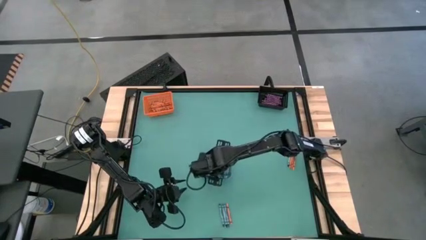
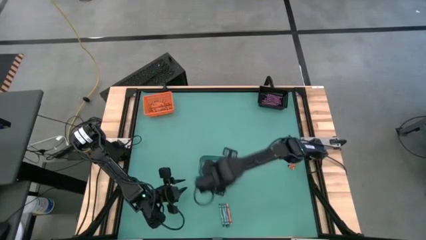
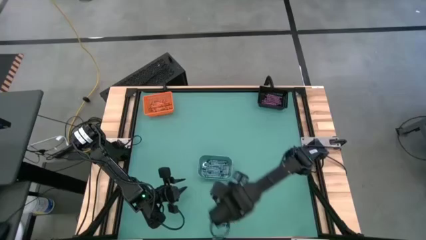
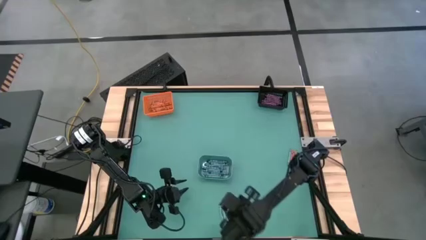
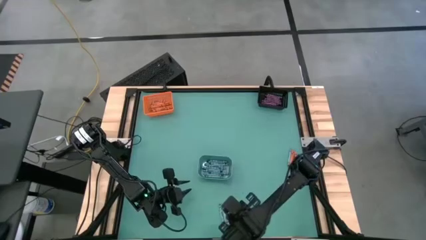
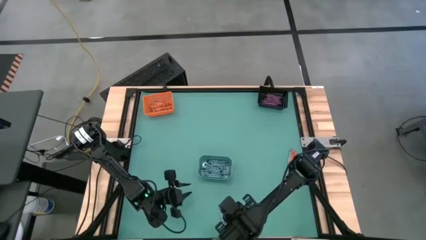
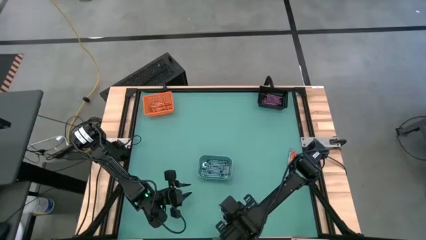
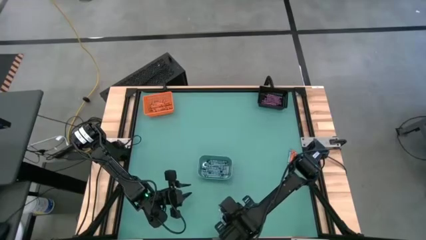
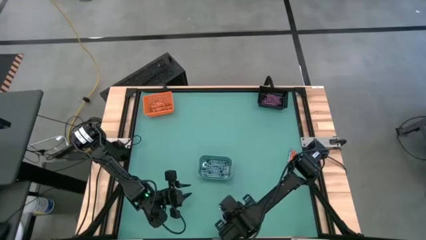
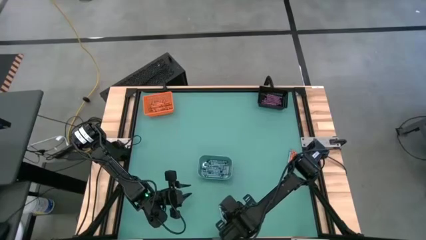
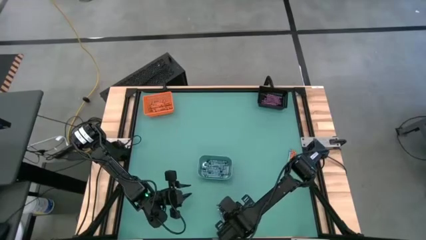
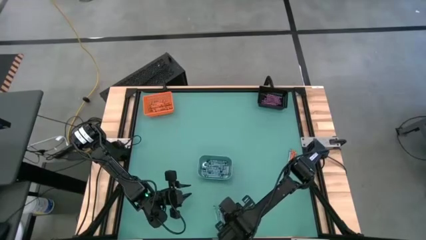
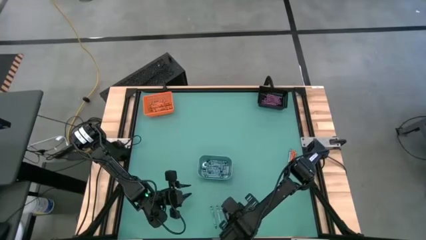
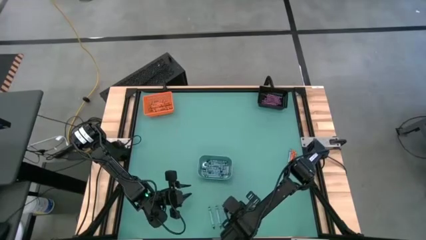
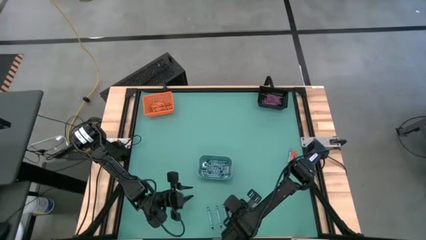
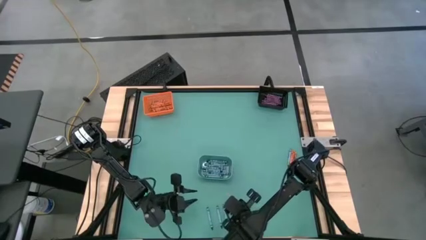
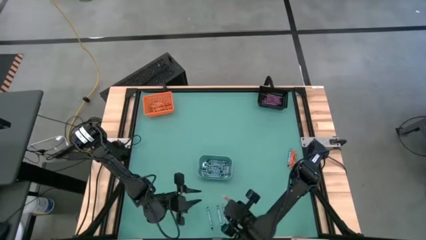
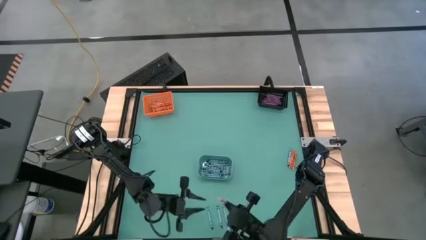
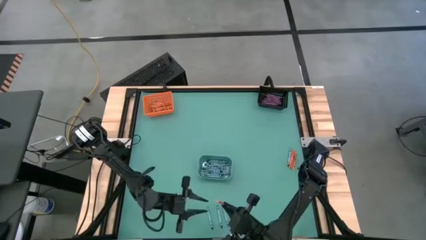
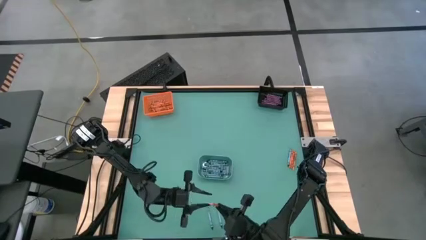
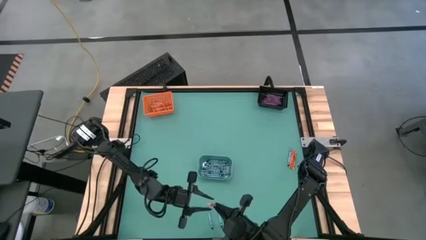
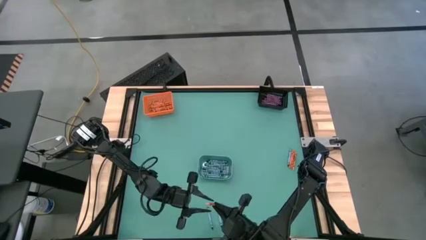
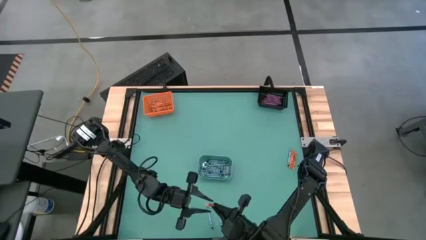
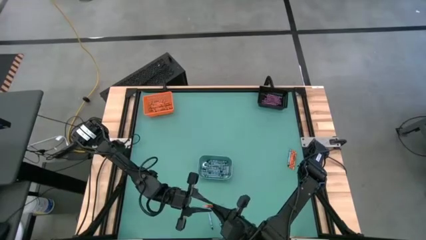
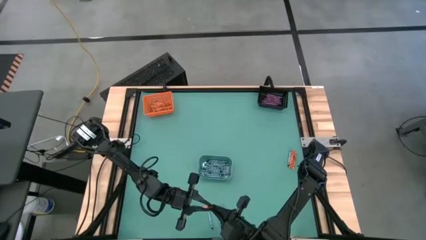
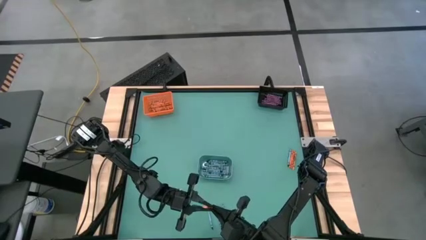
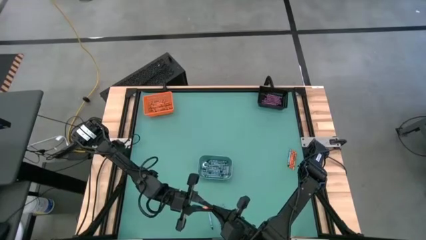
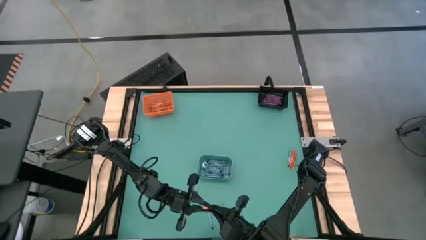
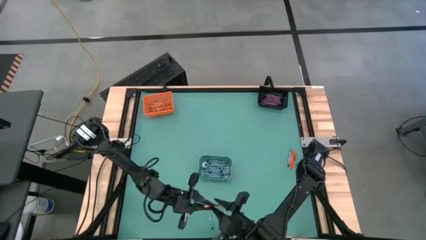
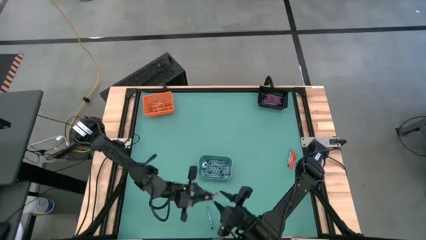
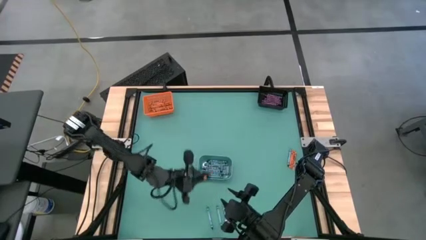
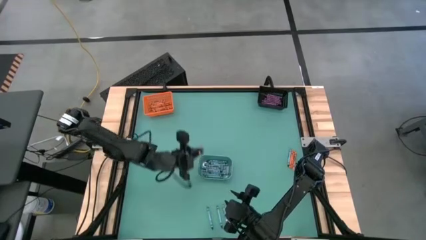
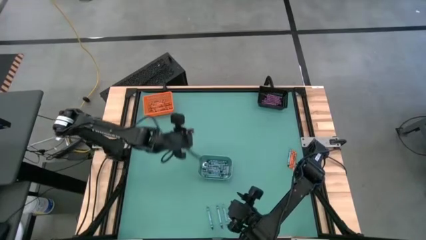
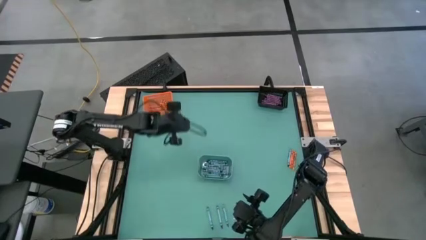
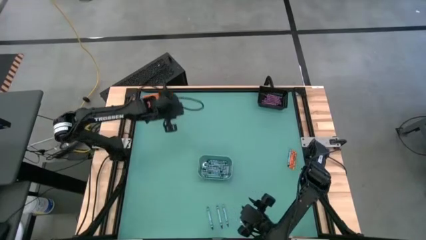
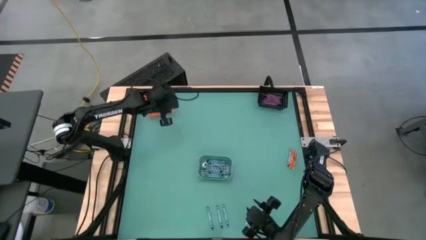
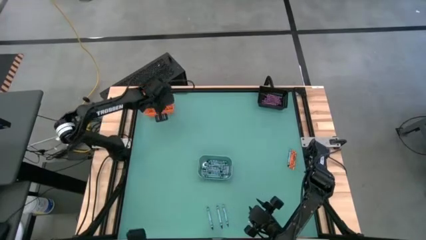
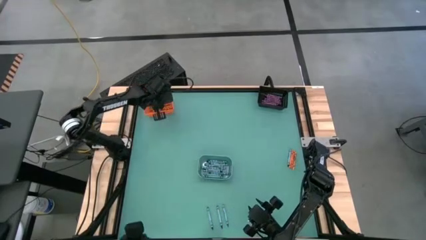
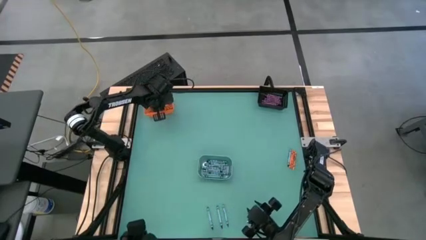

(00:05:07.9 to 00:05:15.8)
Task: Sort crayons
Put the orange crayon into the orange bin

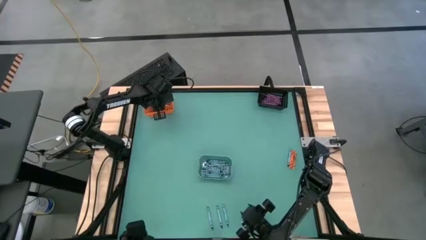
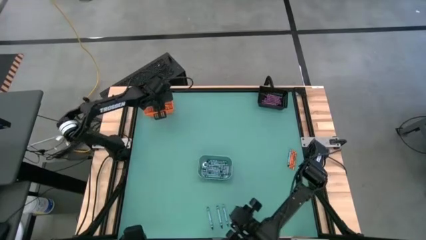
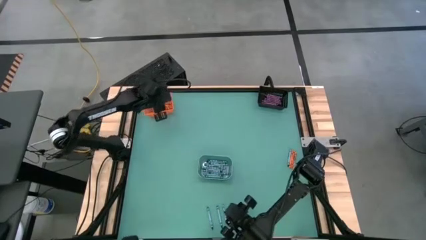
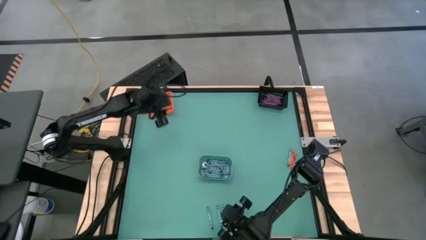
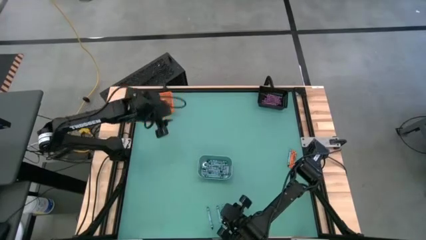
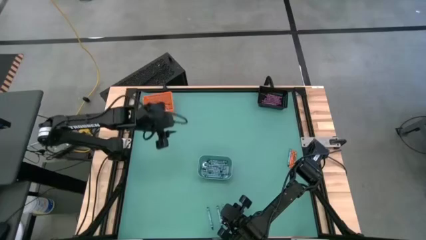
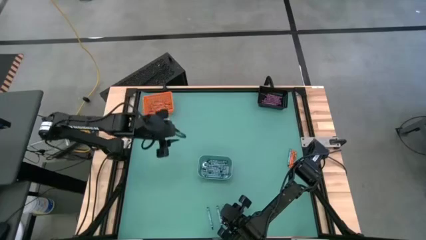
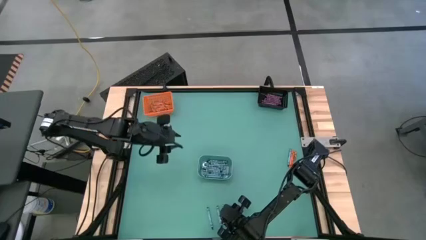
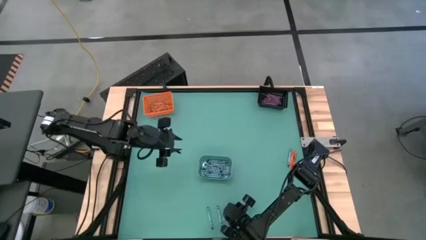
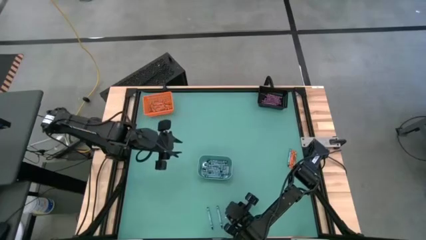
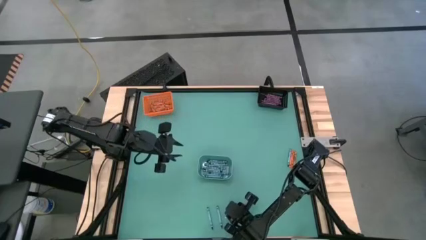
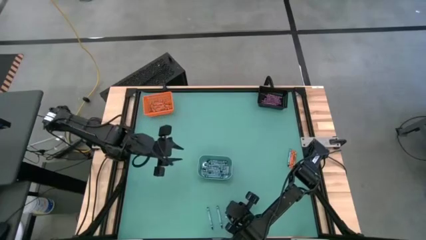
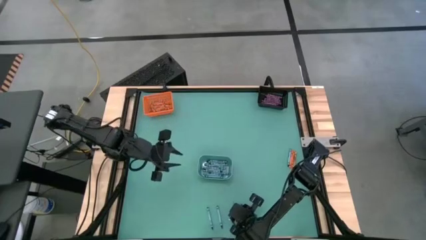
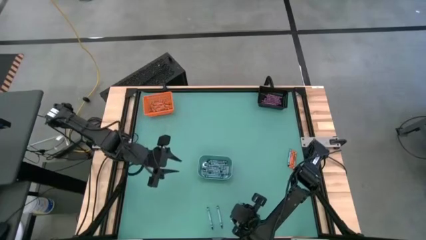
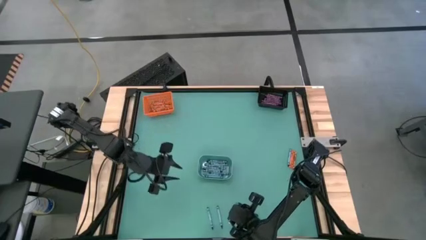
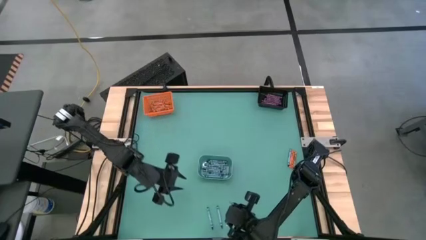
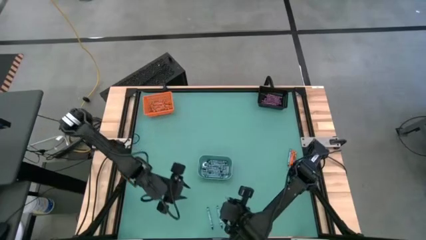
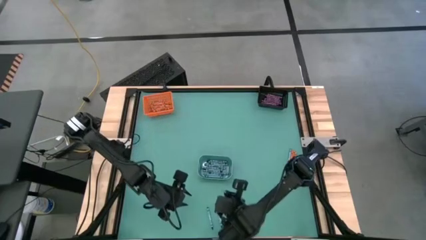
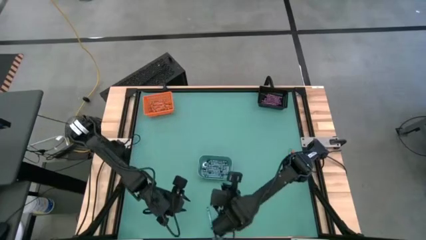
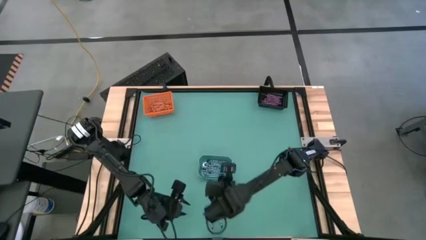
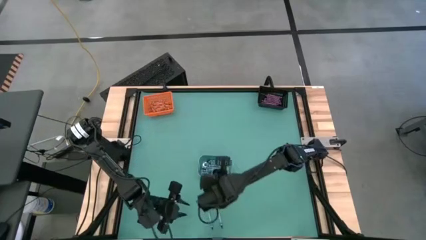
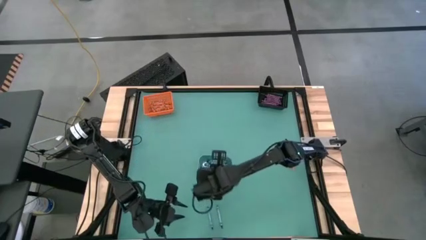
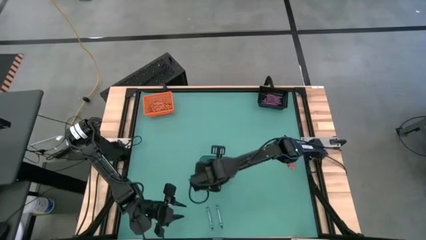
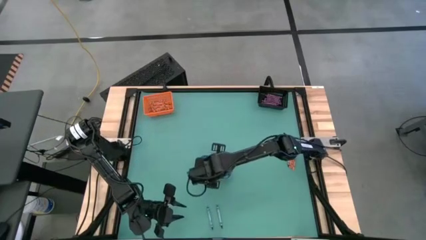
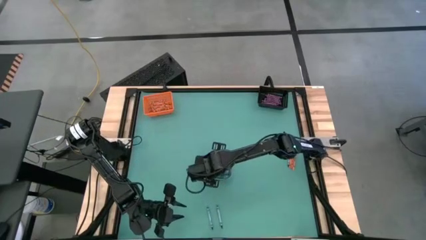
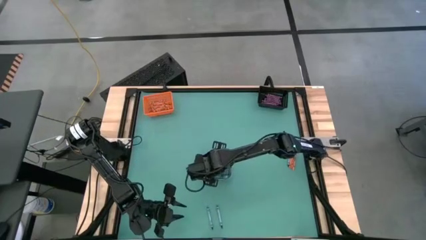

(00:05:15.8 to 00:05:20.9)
Put the light blue crayon into the blue bin

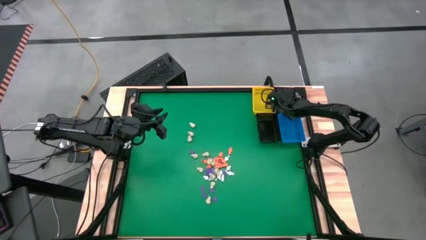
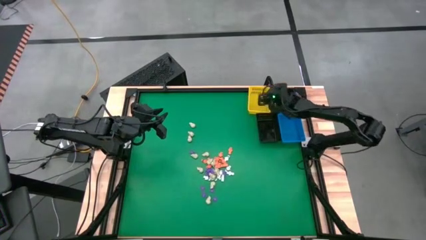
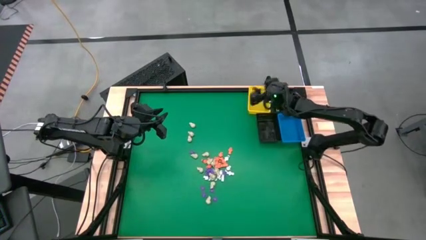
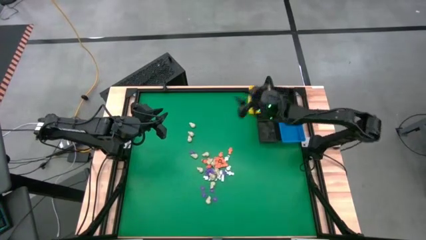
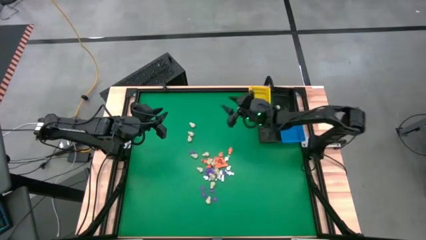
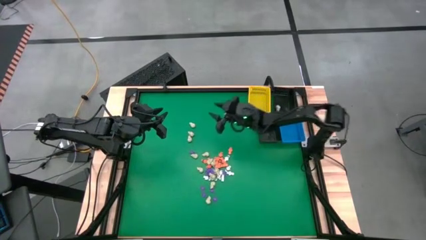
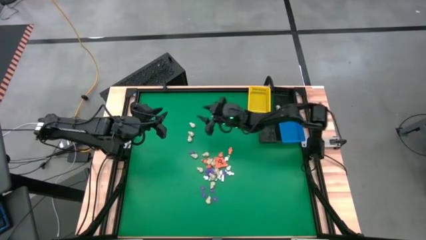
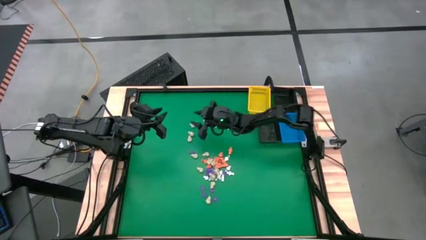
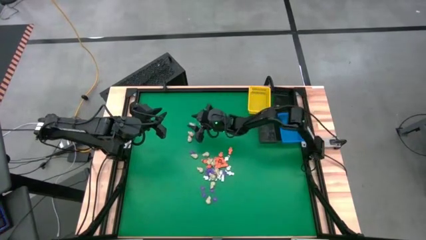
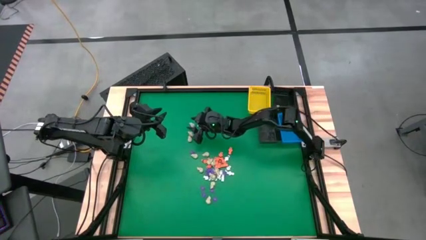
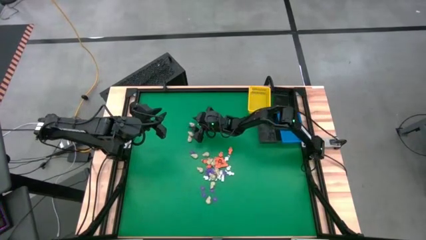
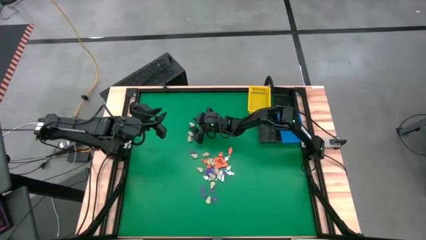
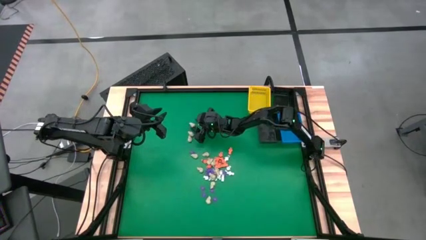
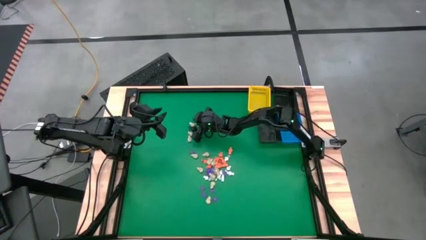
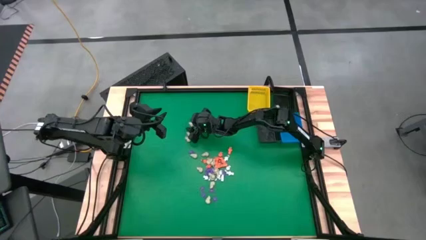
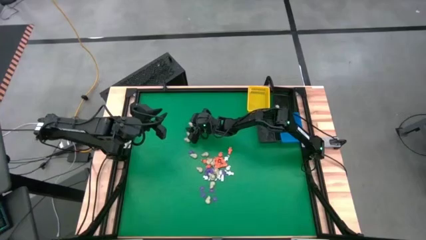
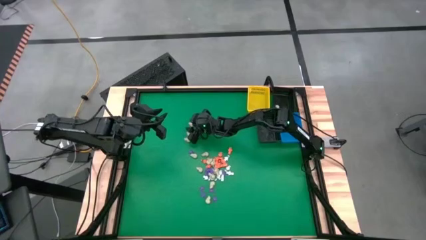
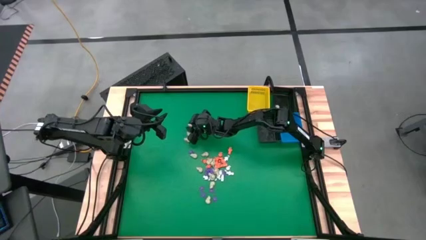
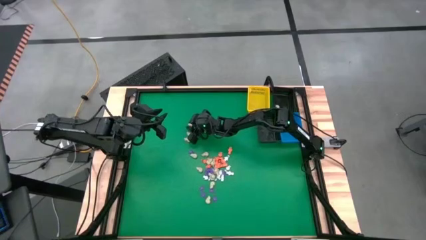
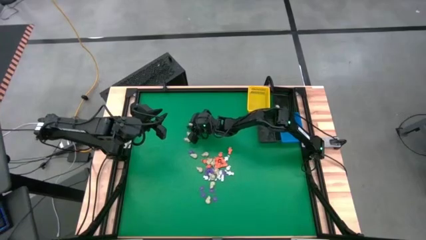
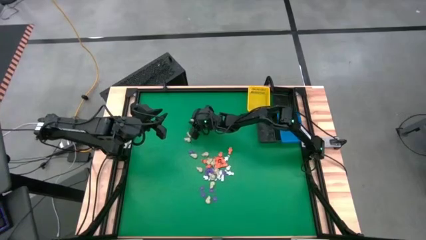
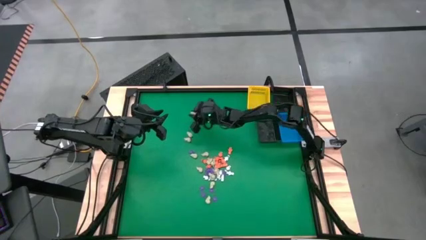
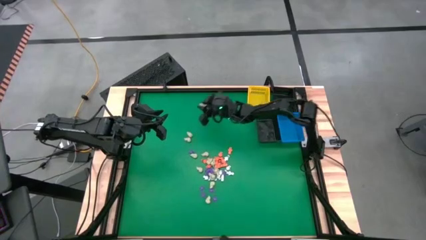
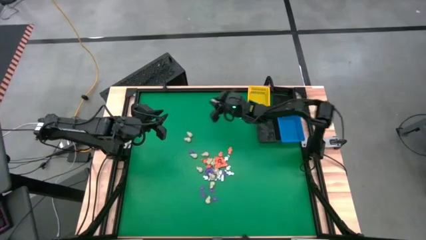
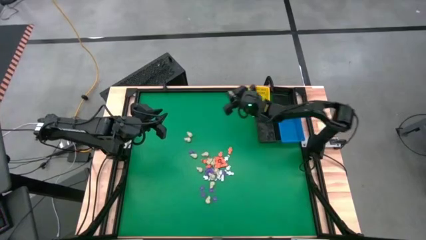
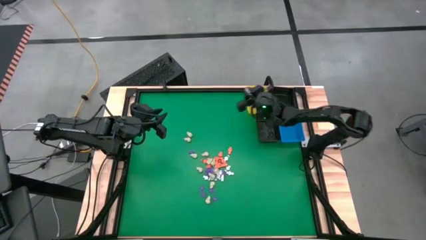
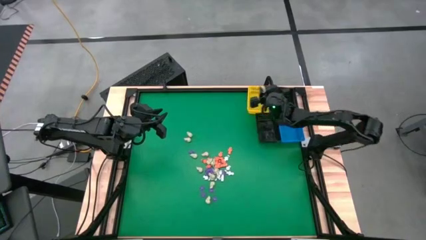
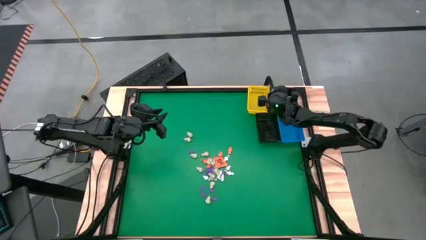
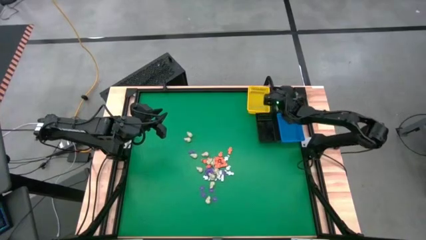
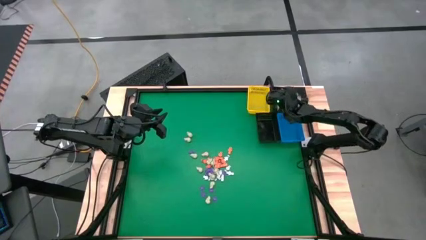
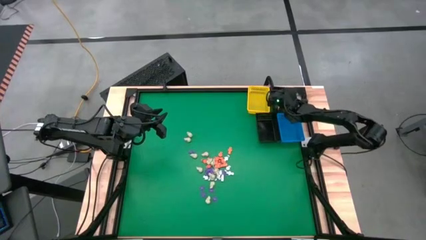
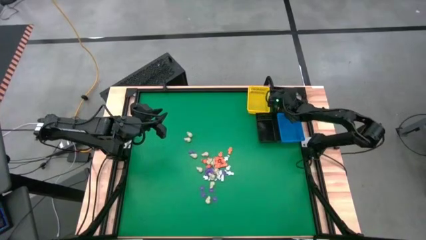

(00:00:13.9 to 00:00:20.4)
Task: Sort Halloween decoration
Put the gray skull toy into the top black basket
